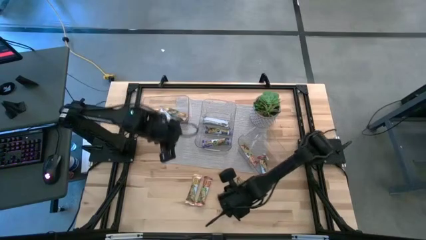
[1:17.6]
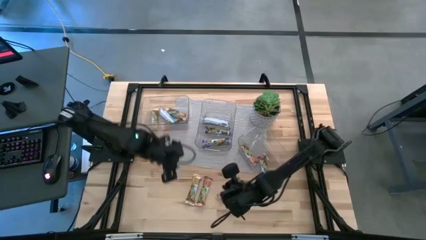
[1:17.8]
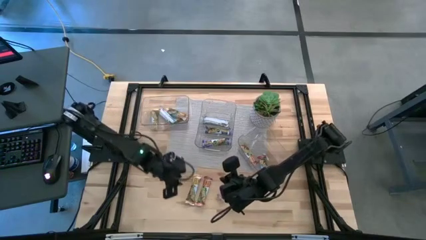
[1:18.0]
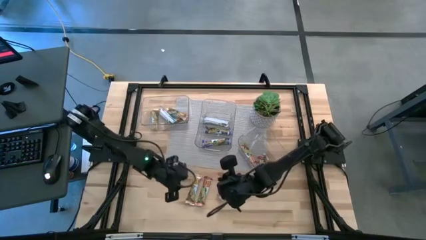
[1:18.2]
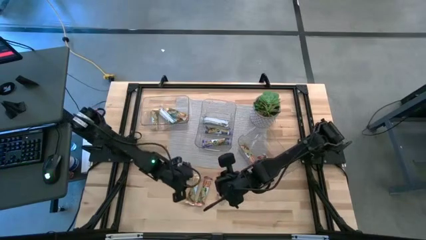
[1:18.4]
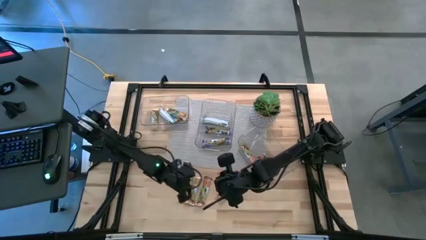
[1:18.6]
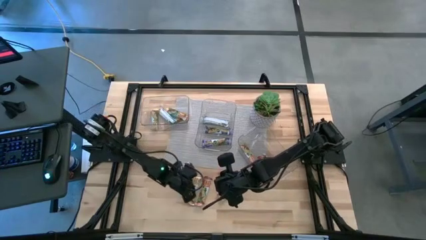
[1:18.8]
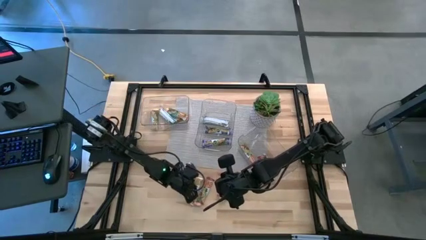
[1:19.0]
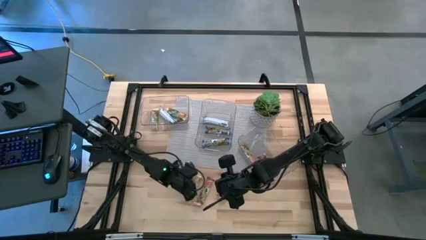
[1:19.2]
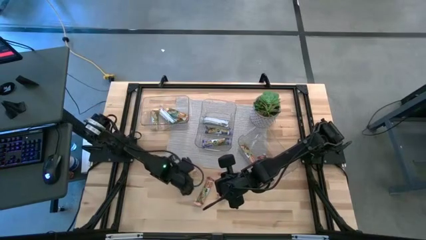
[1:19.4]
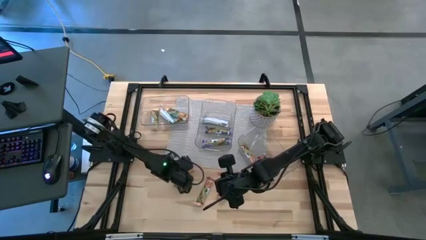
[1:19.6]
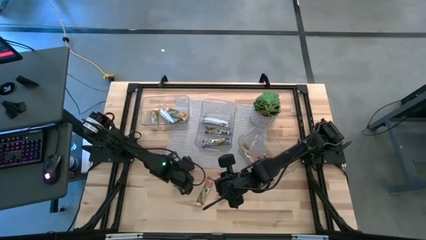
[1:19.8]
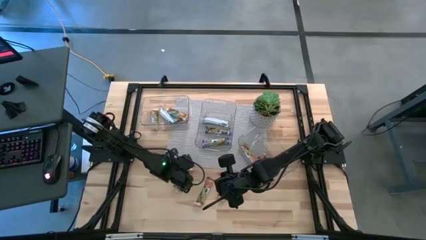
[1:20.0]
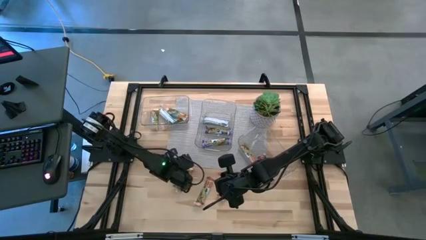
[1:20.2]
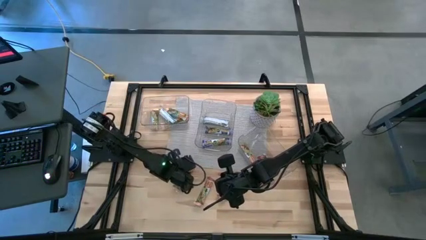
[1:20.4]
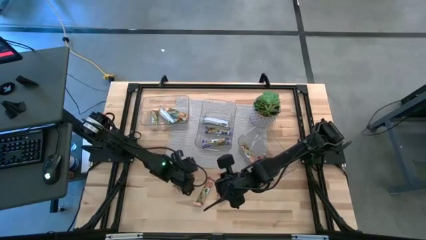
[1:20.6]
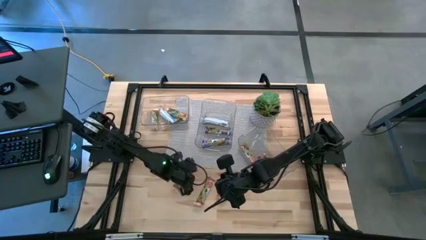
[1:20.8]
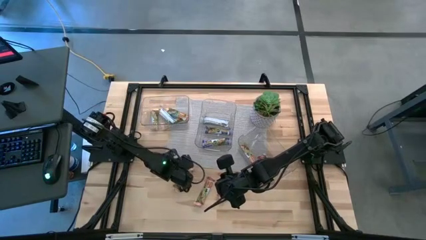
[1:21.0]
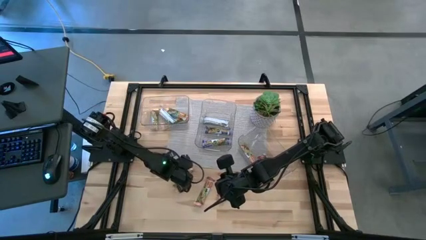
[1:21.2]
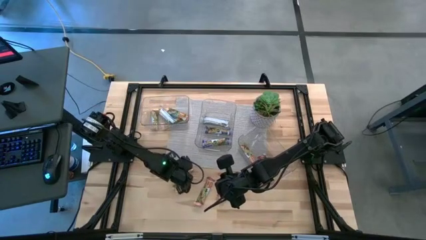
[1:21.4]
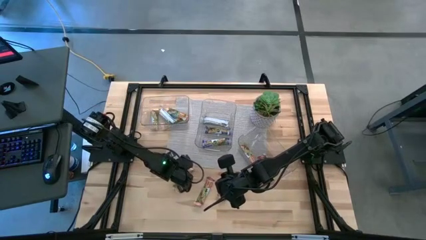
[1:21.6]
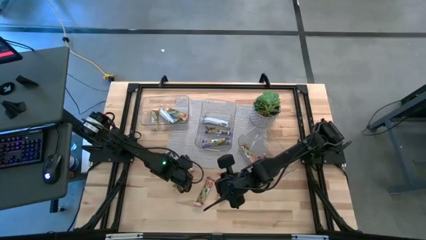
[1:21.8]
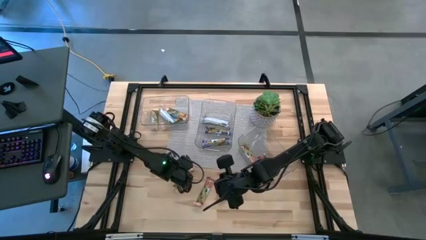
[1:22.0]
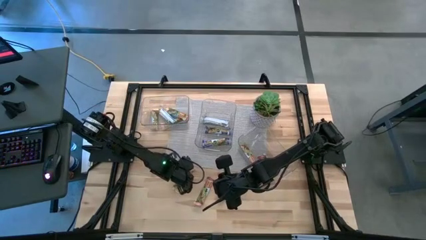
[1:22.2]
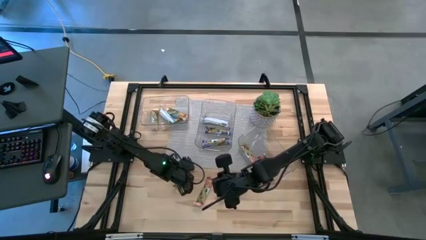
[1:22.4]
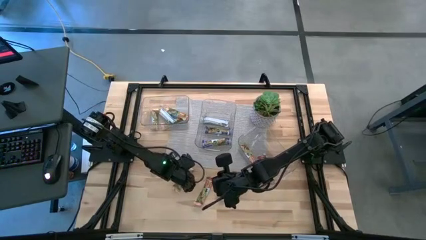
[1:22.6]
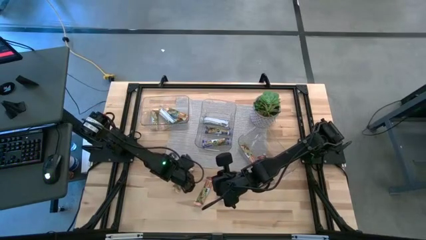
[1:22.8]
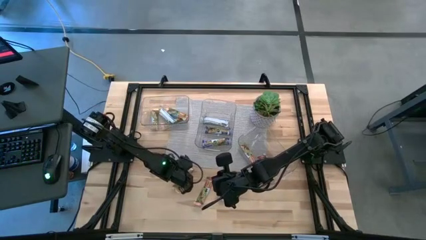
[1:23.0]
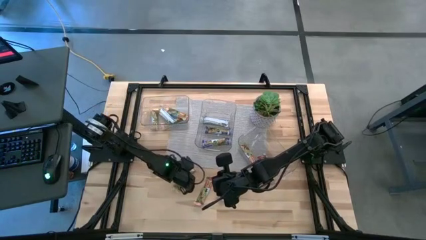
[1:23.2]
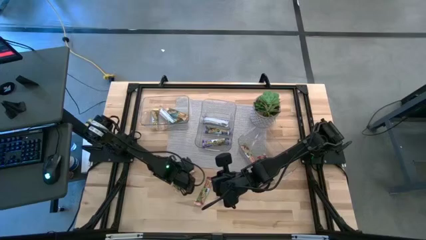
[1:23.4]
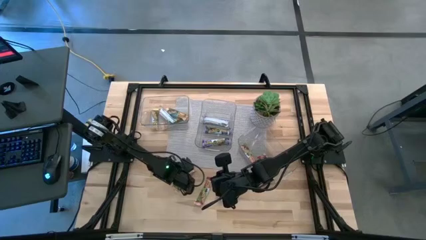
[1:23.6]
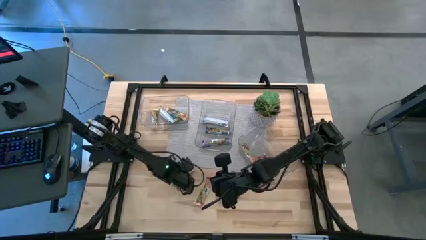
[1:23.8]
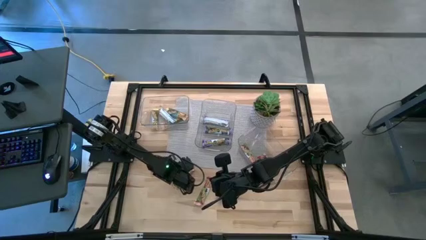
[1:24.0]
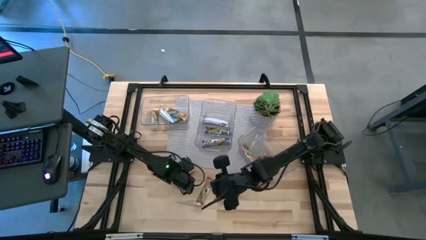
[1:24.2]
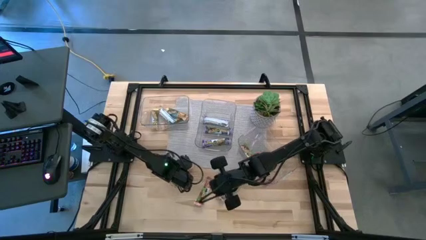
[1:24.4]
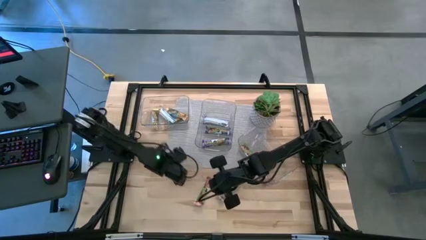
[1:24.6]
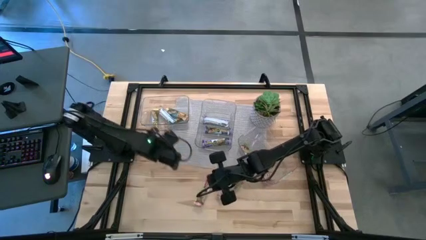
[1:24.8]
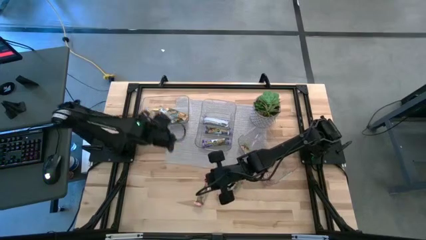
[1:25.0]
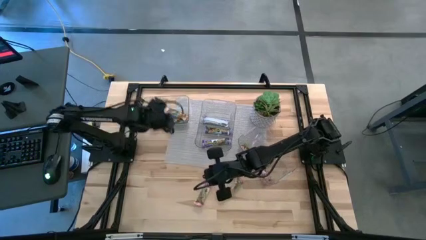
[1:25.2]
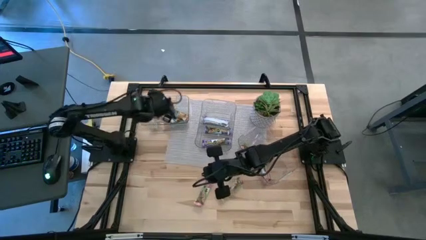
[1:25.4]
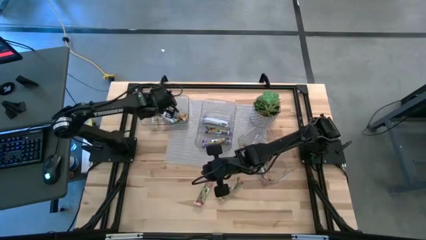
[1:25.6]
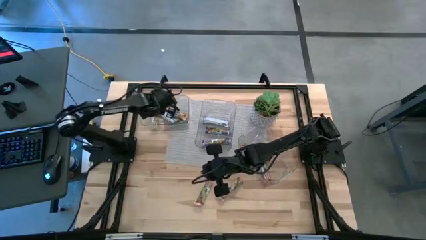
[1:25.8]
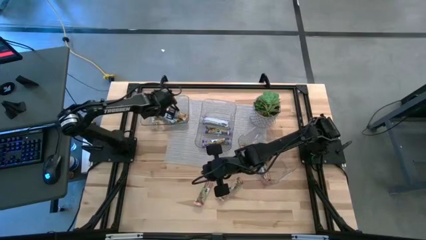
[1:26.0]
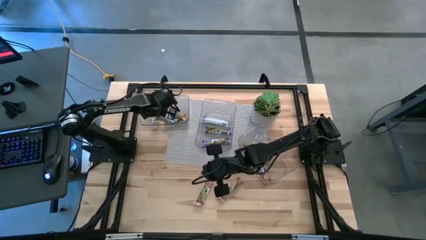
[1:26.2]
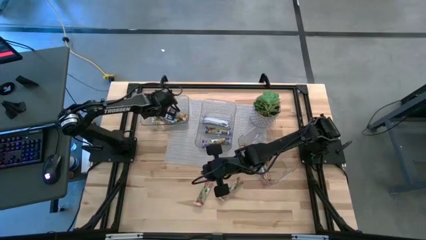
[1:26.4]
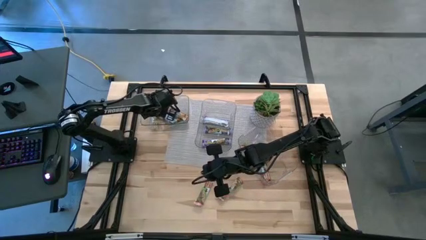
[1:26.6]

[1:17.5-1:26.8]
Task: Pick and place Granola Bars by type
Put the yellow granola bar into the left transparent bin

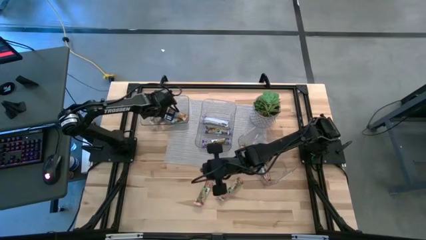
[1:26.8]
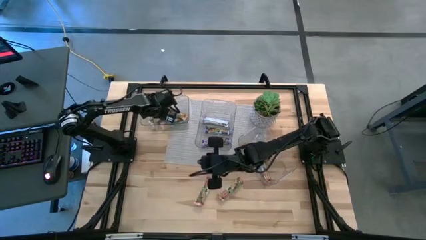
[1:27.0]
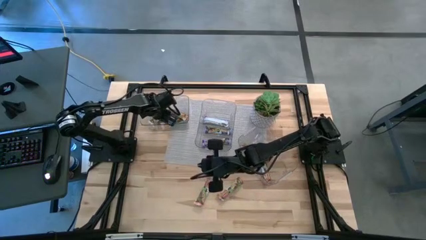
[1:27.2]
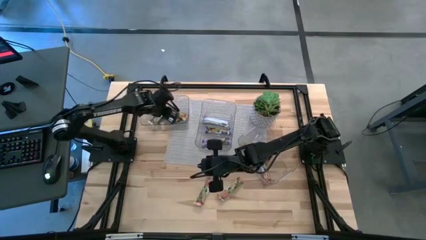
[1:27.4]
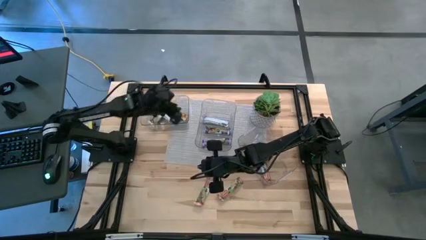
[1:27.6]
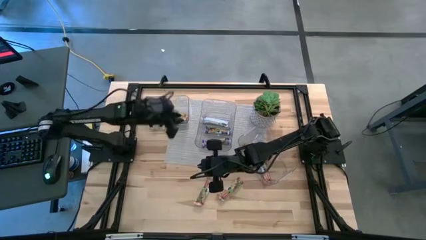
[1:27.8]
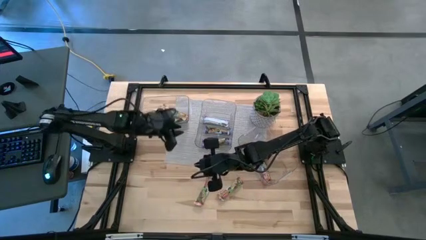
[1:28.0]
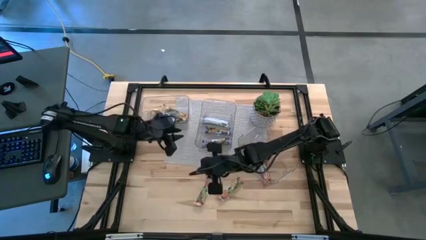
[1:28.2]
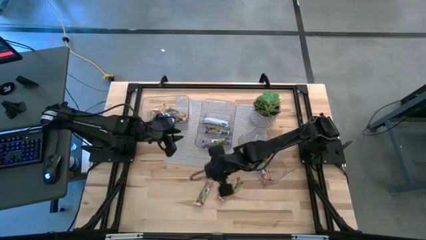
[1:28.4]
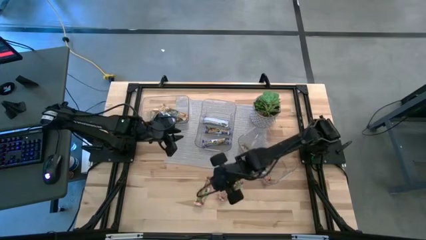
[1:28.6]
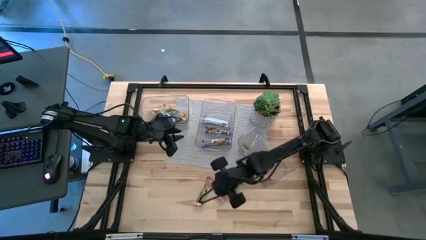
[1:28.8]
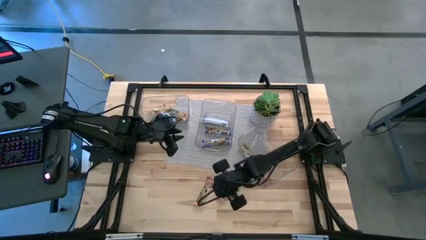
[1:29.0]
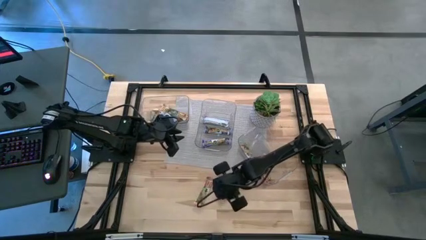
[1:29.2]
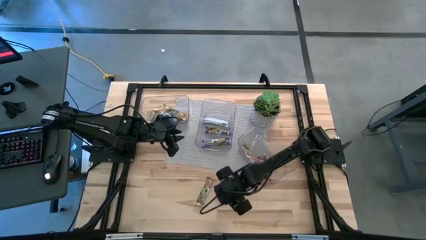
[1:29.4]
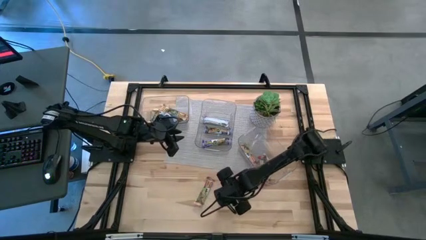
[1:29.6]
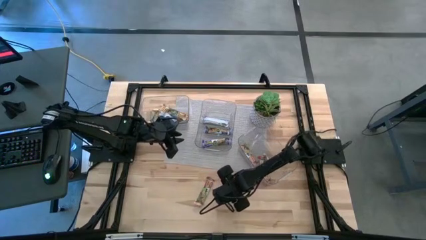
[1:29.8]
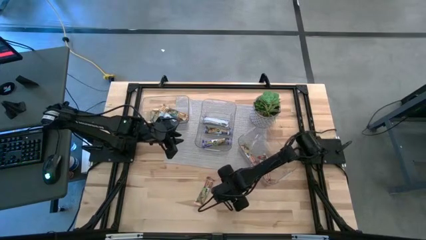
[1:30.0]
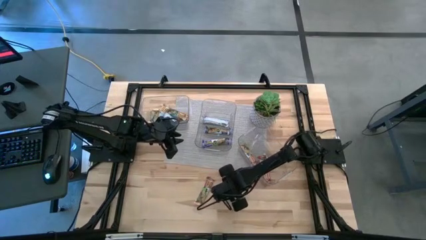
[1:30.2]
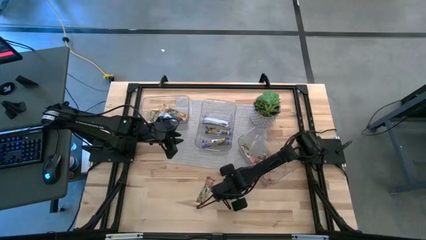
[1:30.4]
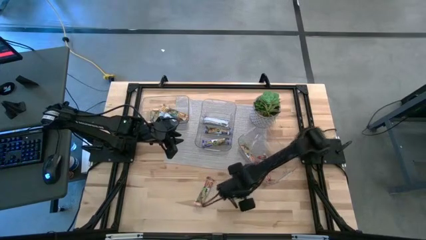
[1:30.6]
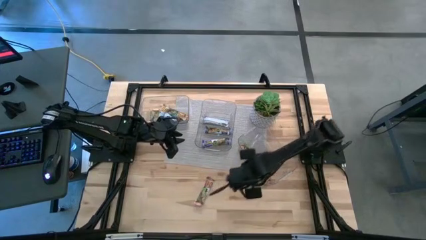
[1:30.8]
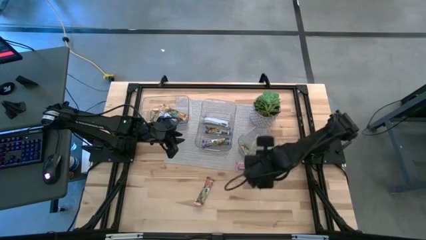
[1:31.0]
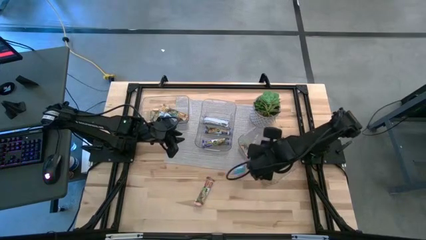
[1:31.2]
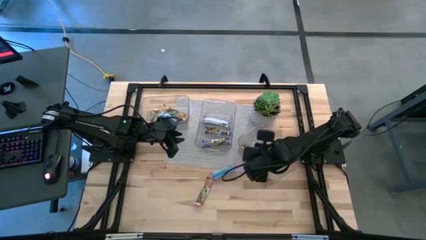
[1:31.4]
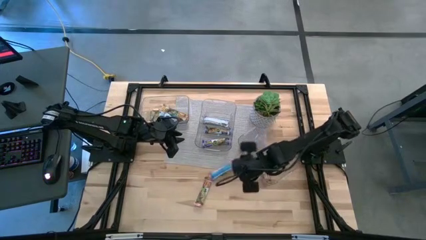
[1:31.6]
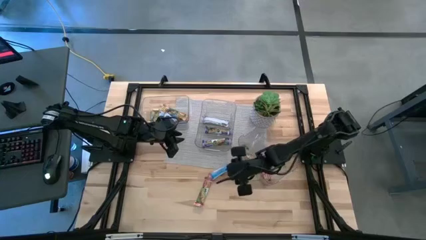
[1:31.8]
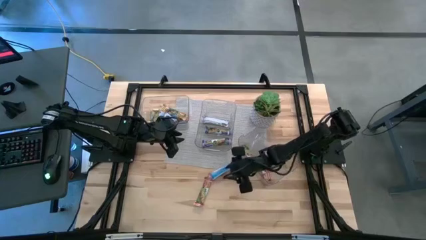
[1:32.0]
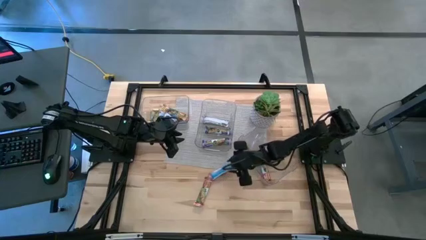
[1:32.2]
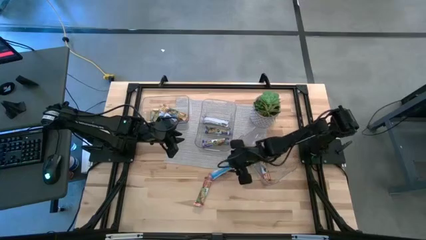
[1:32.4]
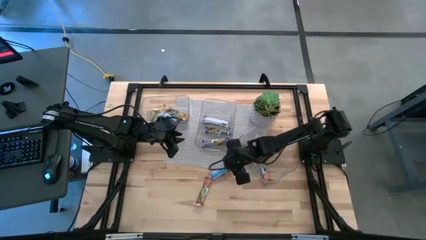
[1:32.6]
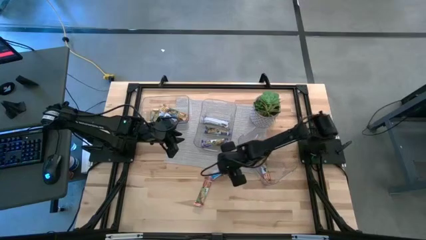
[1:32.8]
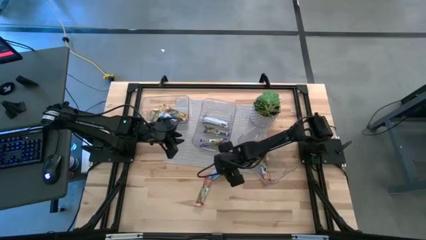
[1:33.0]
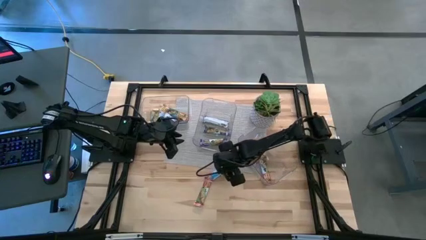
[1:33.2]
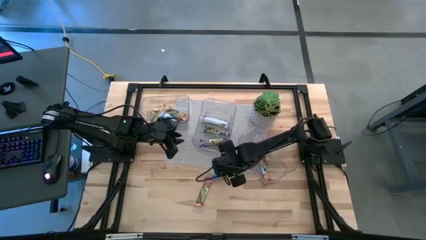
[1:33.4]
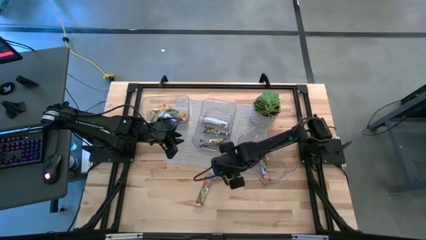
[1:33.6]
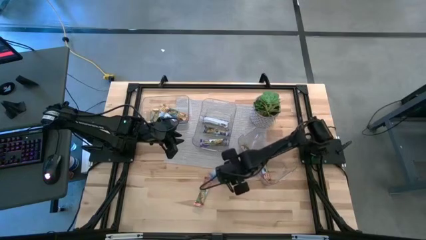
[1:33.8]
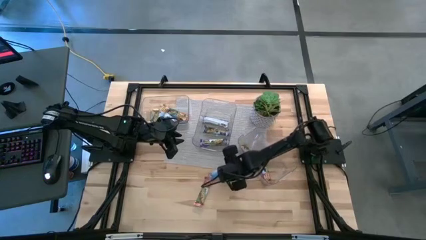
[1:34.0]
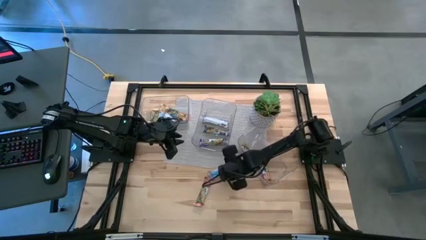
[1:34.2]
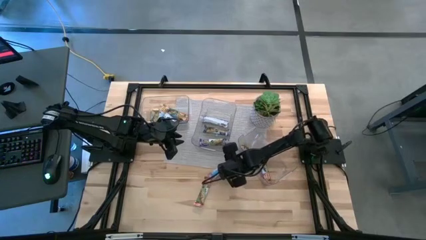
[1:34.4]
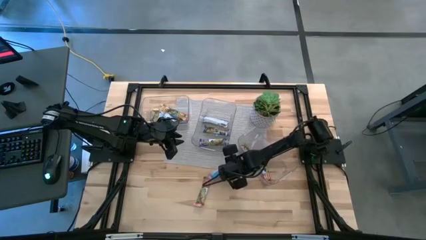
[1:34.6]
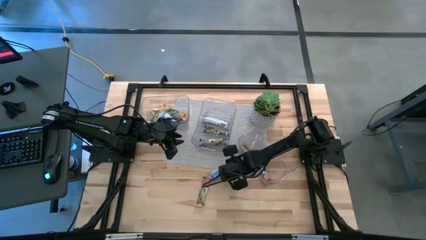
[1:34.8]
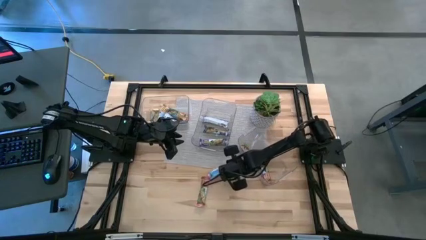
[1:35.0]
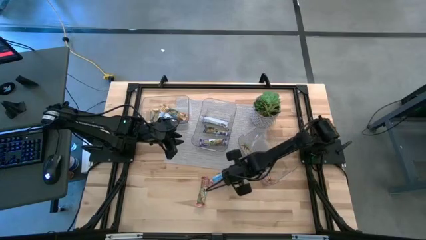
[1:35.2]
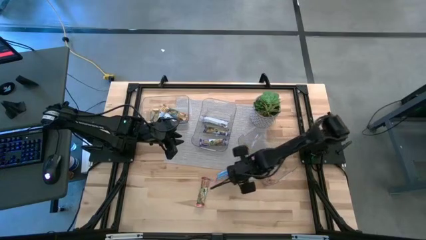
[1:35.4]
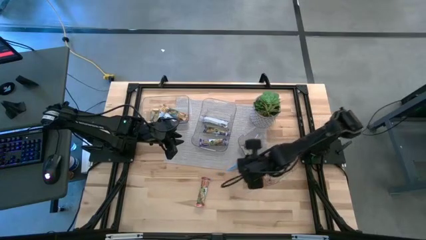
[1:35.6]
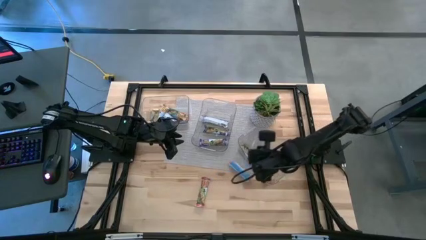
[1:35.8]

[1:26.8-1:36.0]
Put the red granola bar into the right transparent bin
